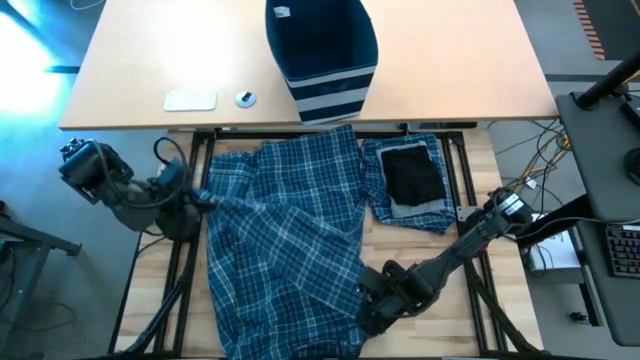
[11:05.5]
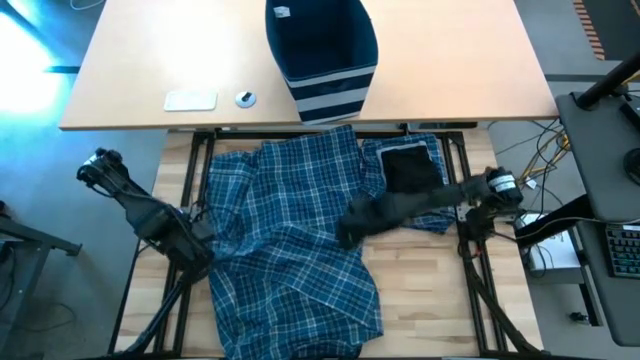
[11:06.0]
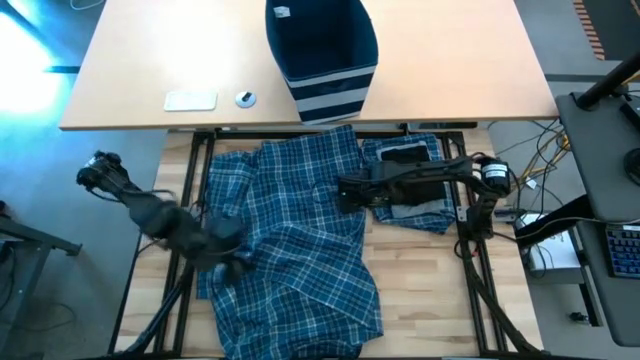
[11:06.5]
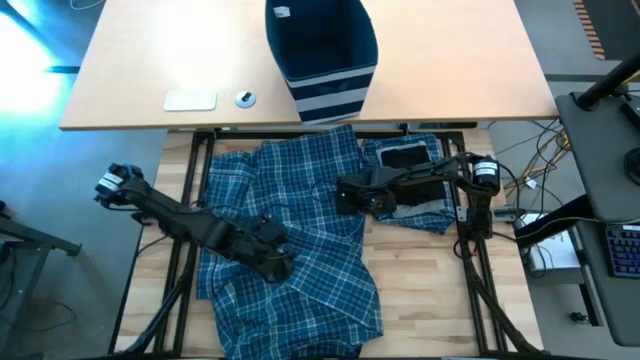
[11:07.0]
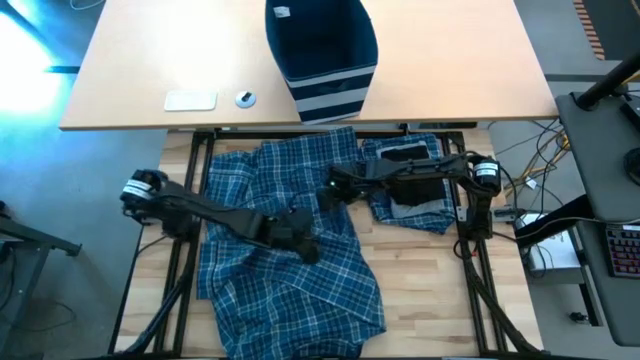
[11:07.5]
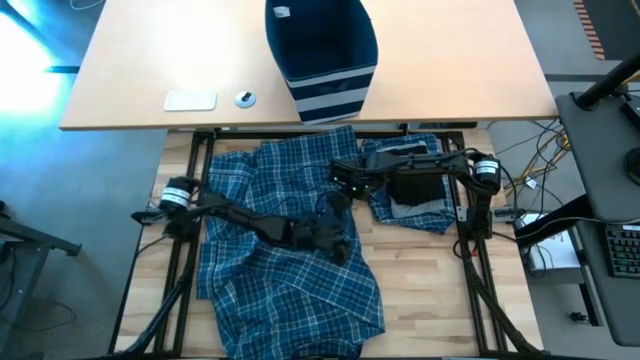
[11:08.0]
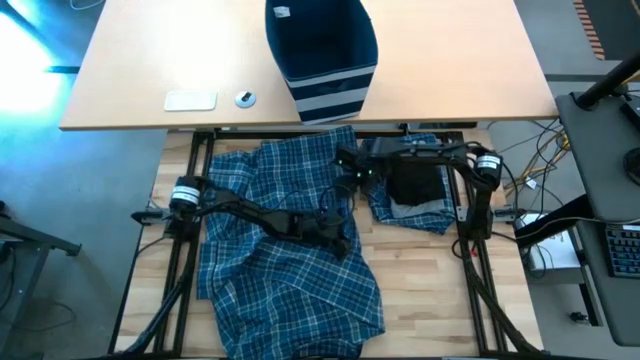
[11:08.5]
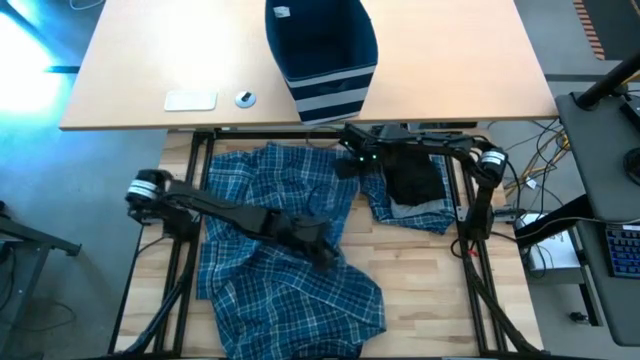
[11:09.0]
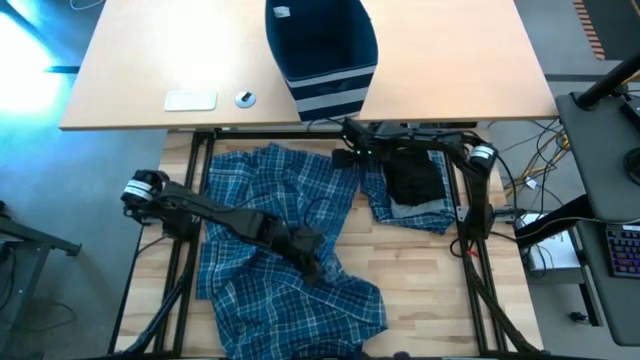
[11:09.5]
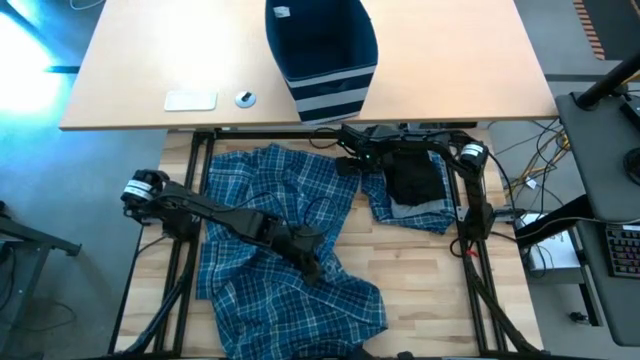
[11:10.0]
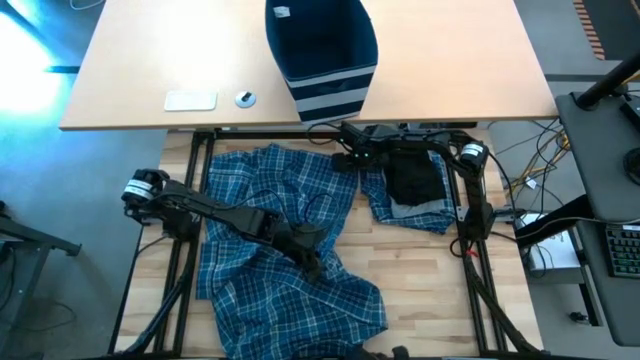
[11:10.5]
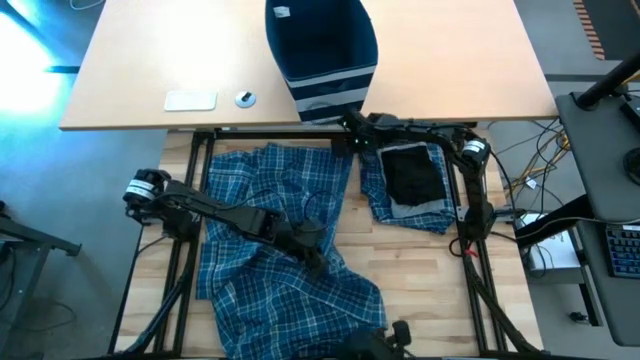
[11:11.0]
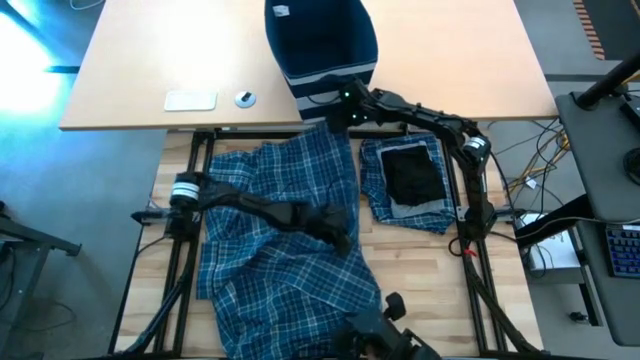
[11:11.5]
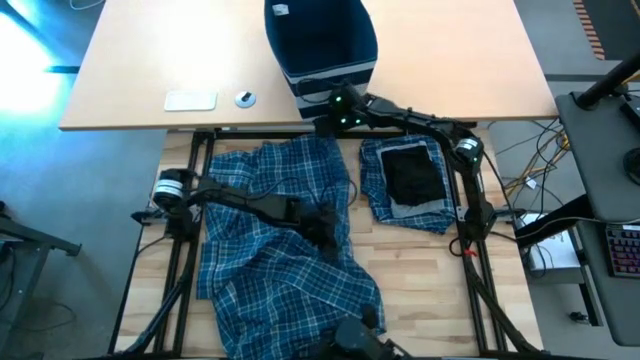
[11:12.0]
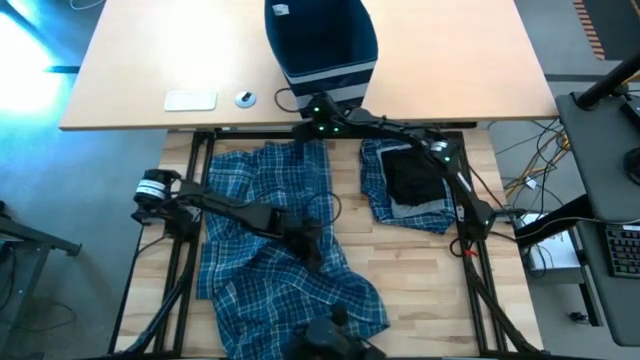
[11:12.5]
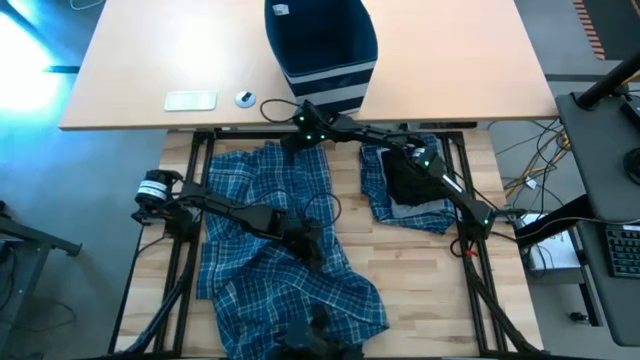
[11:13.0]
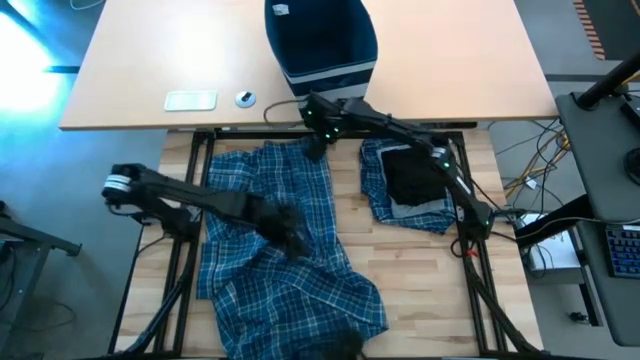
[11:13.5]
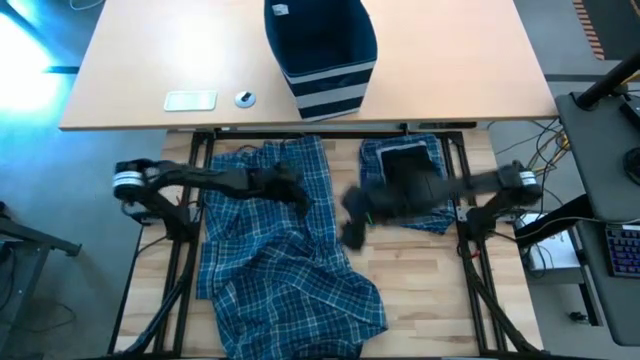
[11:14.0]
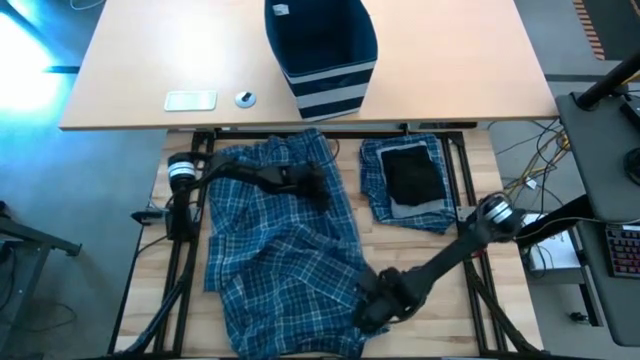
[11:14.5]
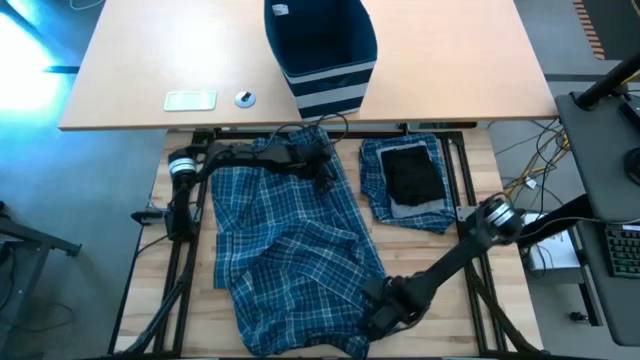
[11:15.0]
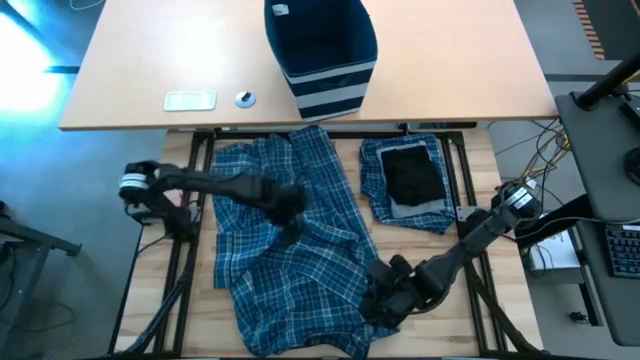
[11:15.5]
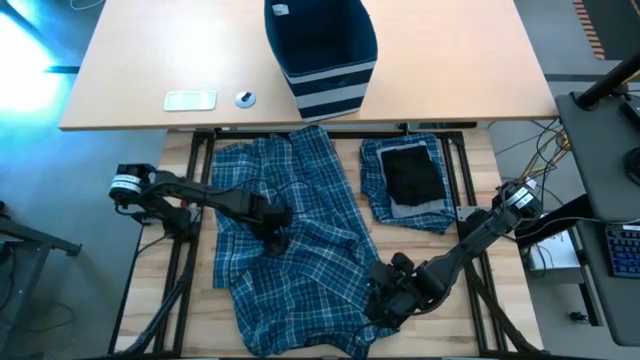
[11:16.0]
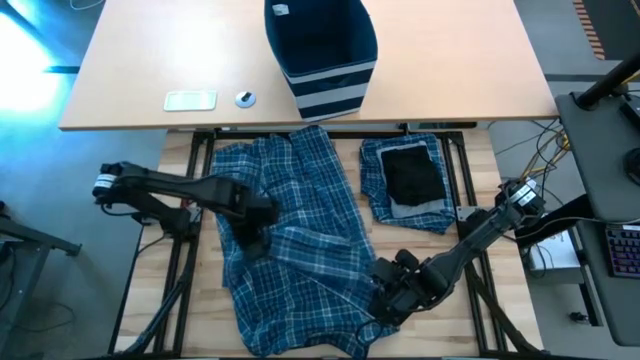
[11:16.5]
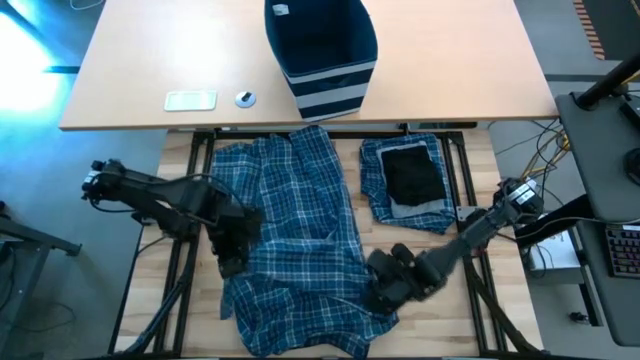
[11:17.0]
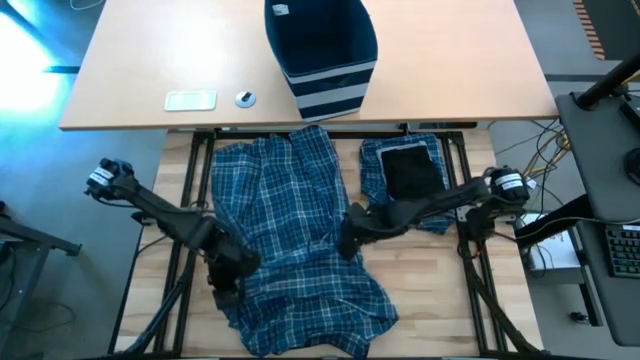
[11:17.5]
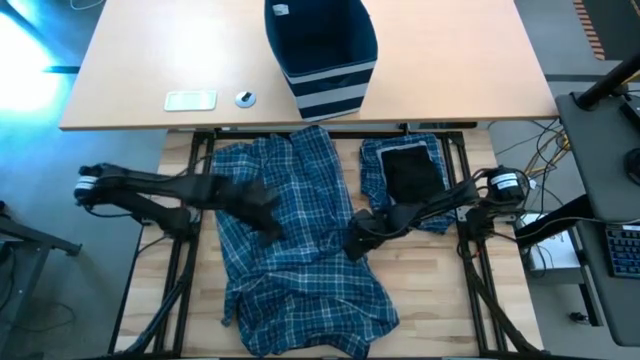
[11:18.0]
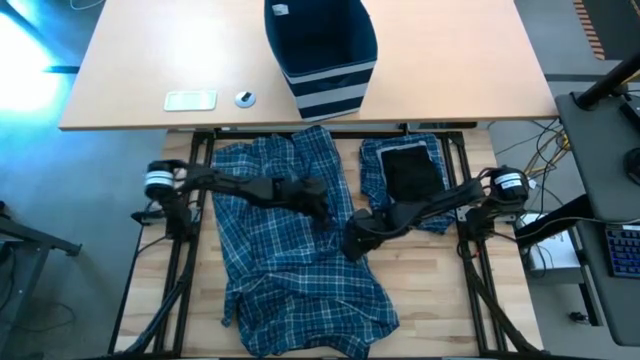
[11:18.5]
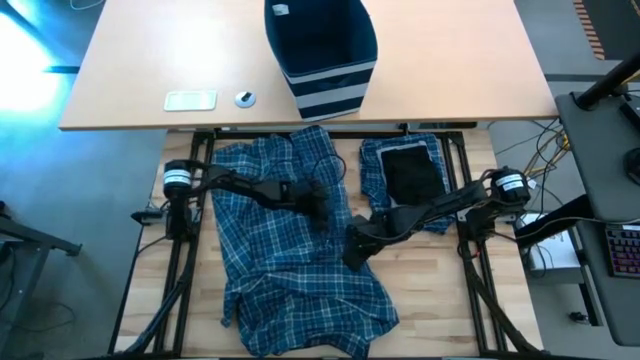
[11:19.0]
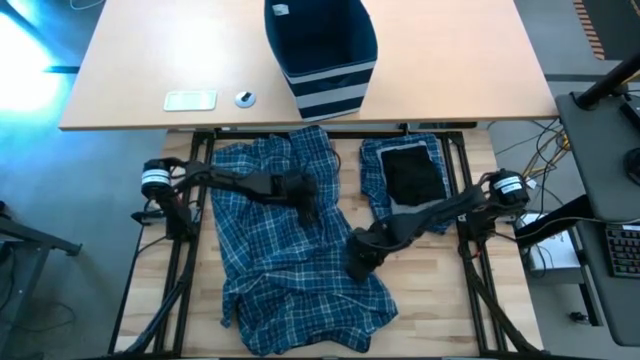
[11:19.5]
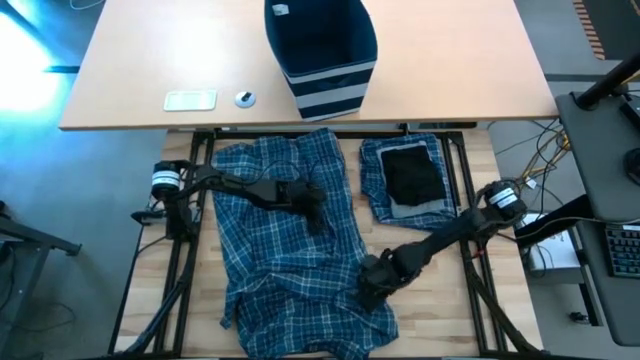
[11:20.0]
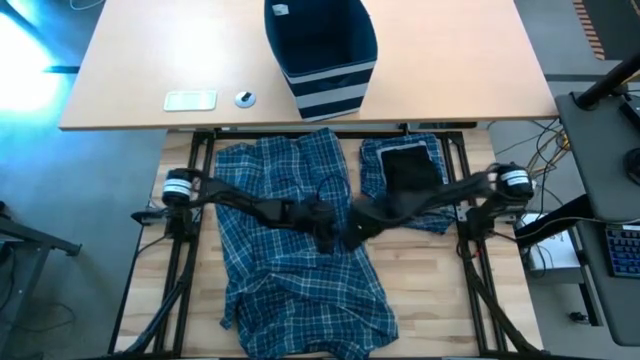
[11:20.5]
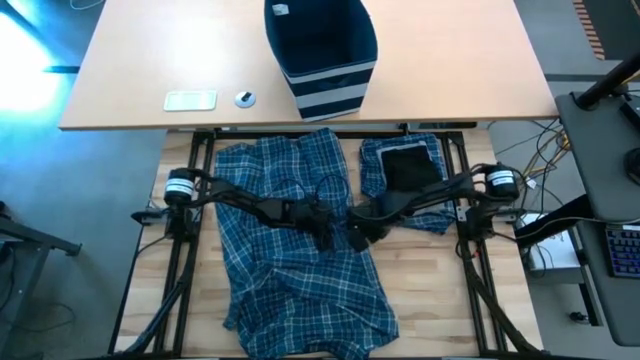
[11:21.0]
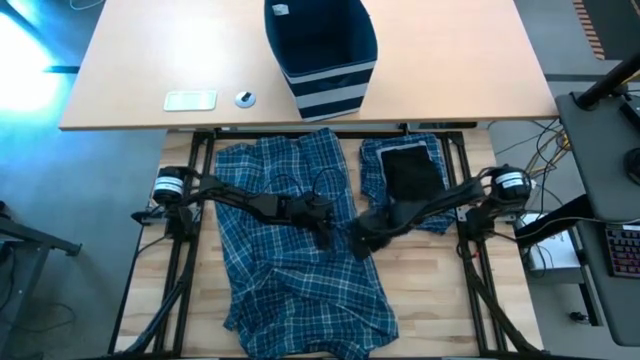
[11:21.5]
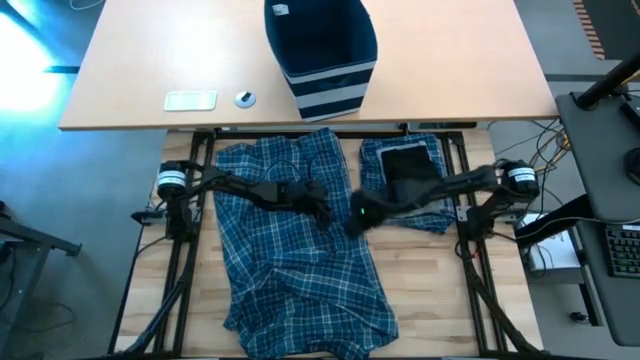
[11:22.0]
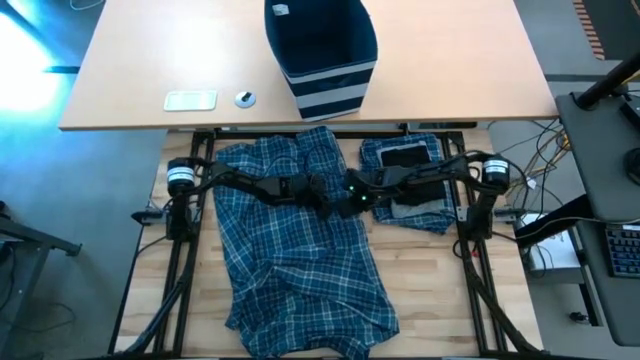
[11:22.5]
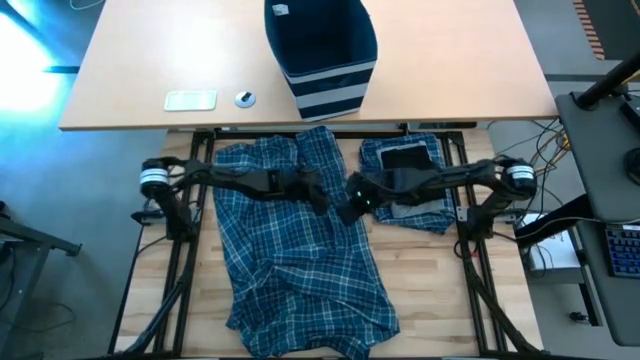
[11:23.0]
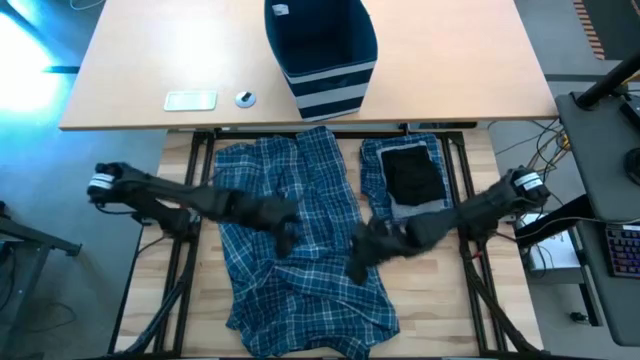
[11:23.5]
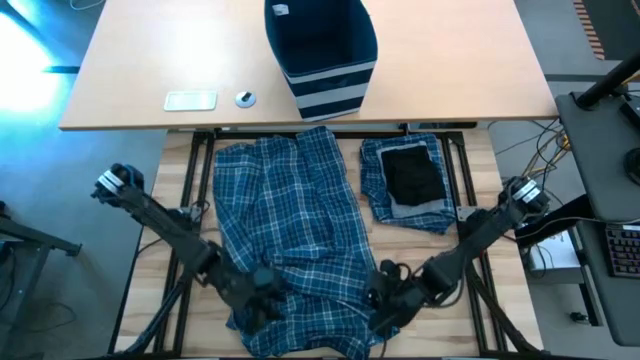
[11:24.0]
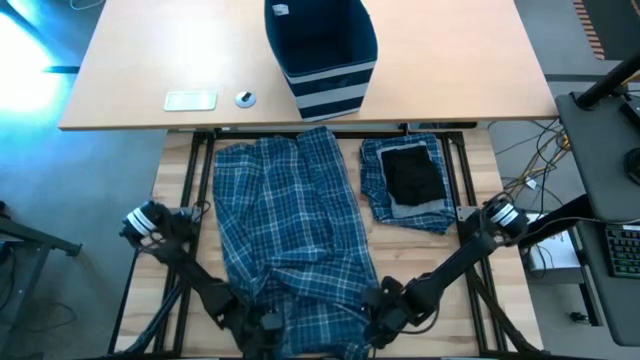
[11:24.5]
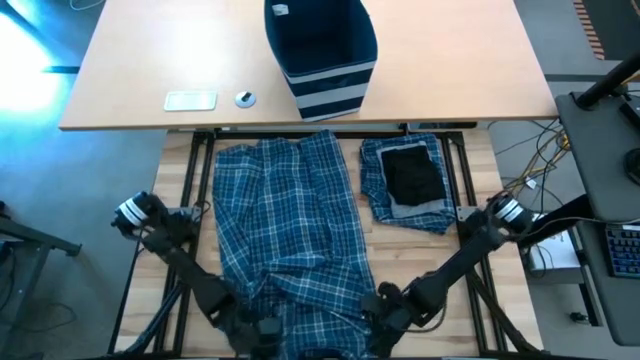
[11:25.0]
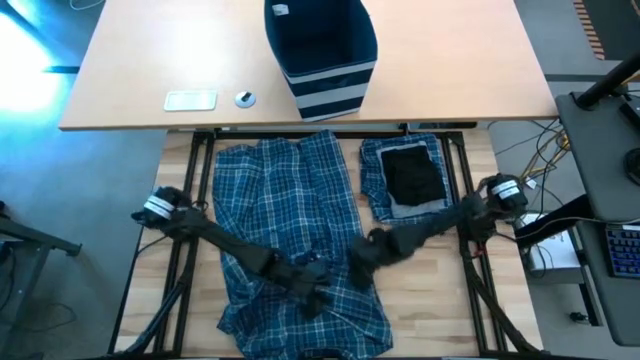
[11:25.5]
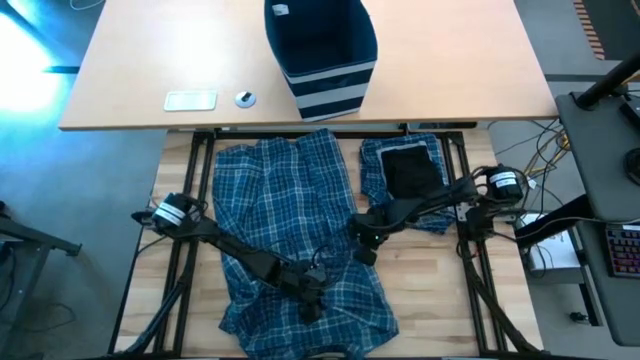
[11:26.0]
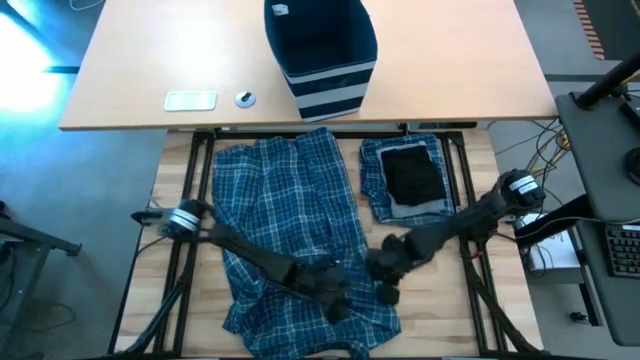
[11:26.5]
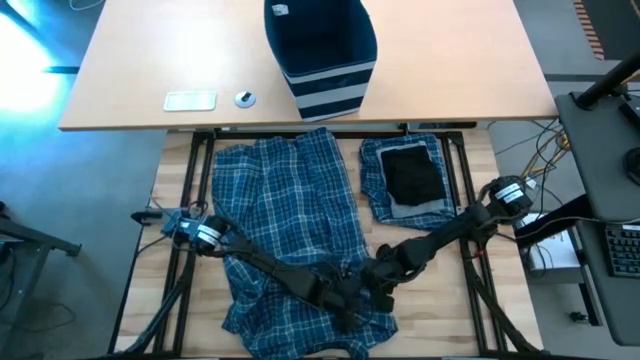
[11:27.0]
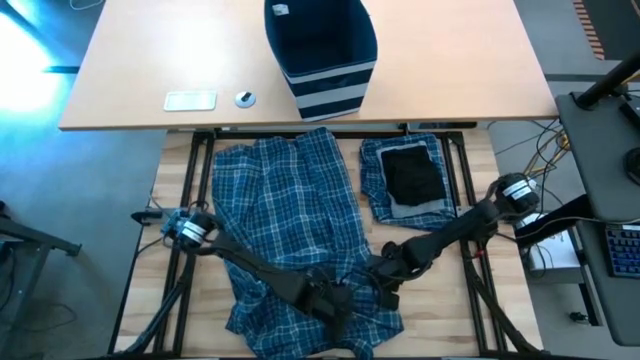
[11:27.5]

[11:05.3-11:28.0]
Task: Fold Laundry from Bin
Fold the blue patterned long sleeve
